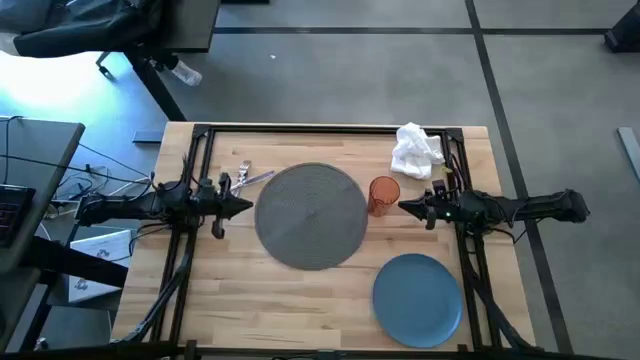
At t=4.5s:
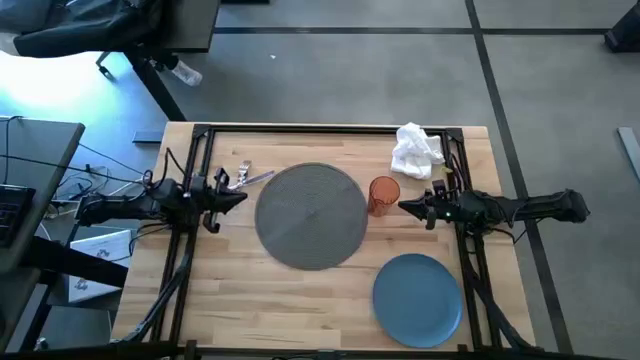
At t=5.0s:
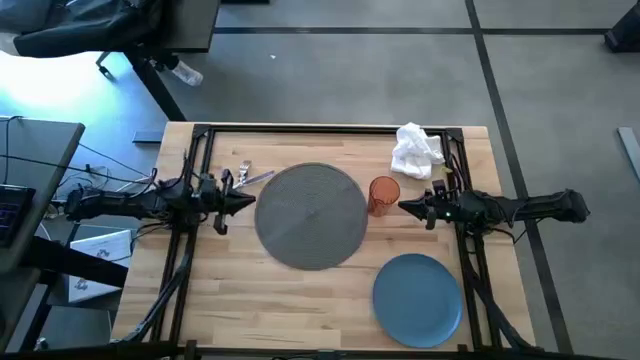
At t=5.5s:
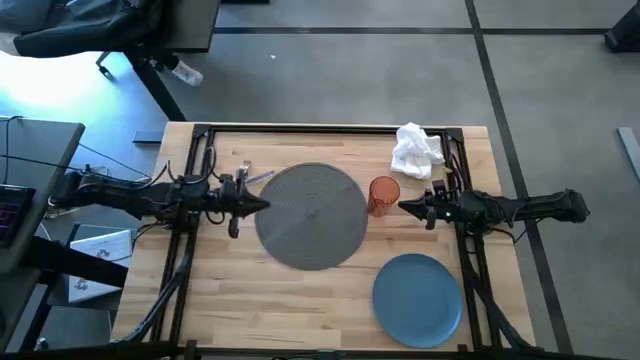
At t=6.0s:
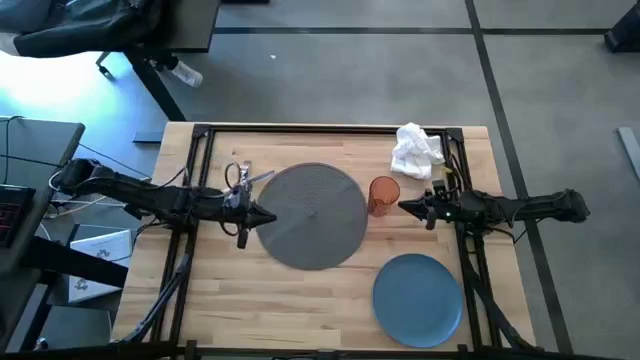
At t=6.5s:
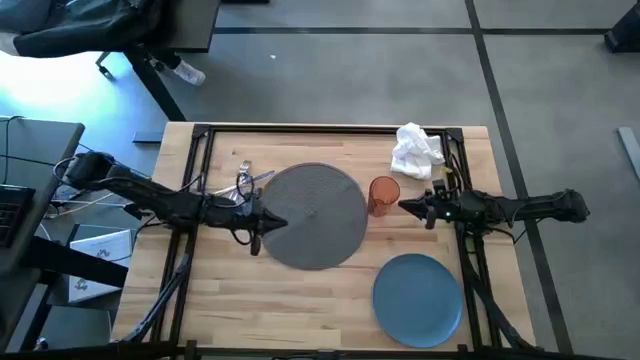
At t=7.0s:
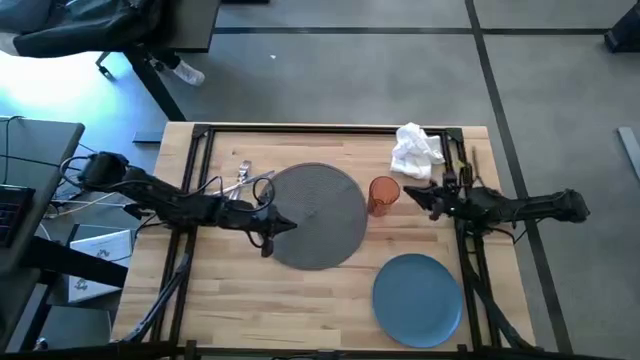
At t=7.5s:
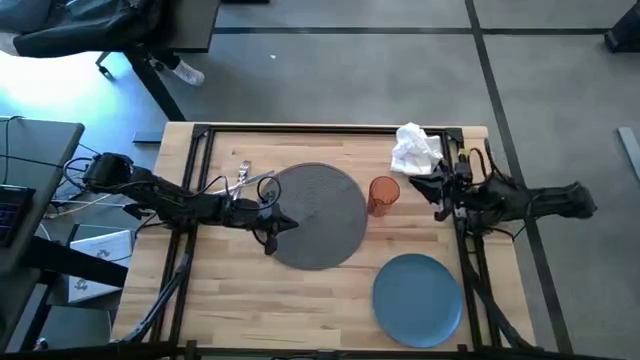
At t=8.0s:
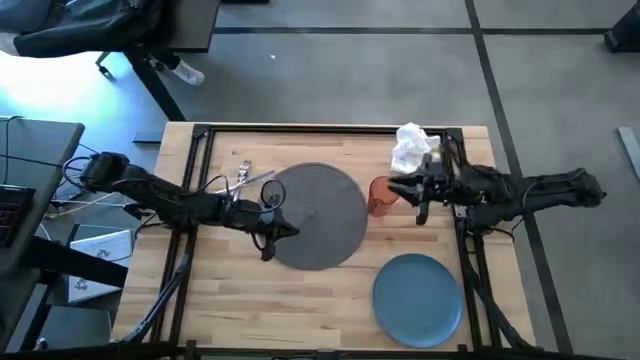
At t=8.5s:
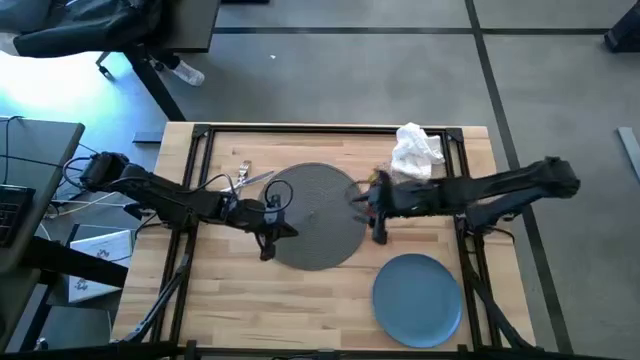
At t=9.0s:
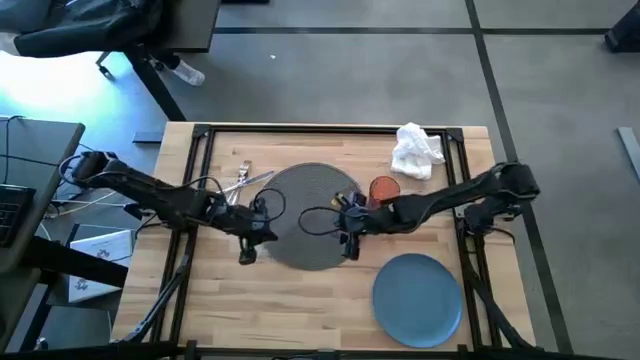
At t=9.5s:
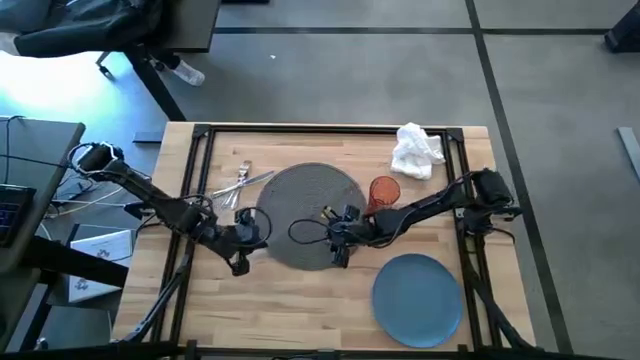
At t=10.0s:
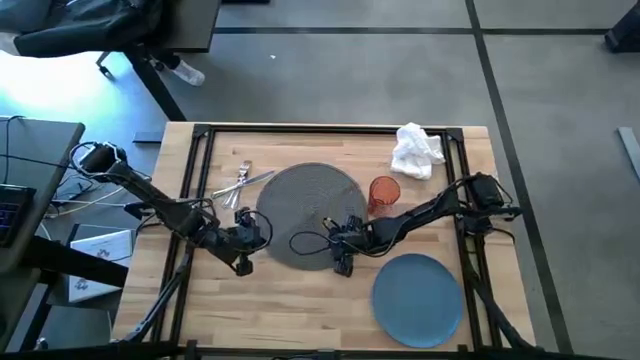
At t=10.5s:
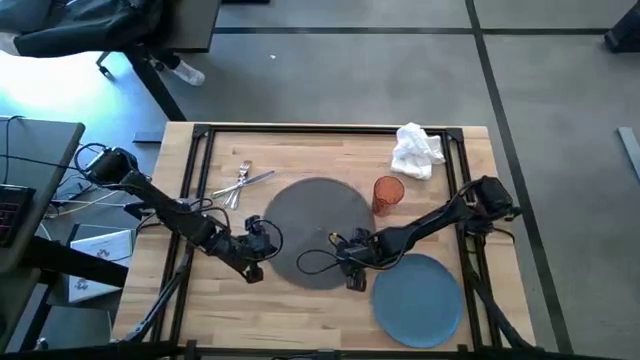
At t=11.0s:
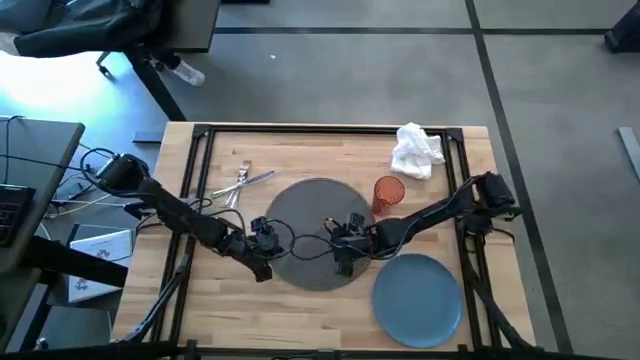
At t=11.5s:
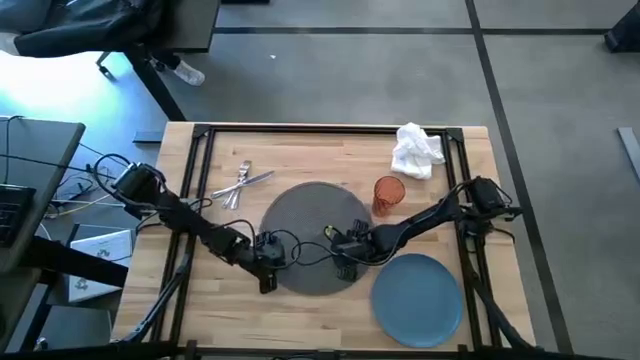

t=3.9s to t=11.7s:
Task: Set table place
Prepare the gray table mat

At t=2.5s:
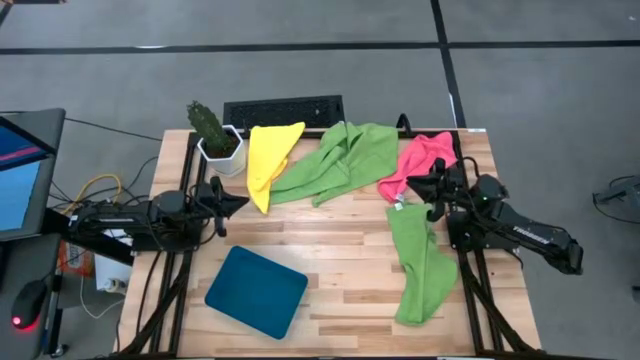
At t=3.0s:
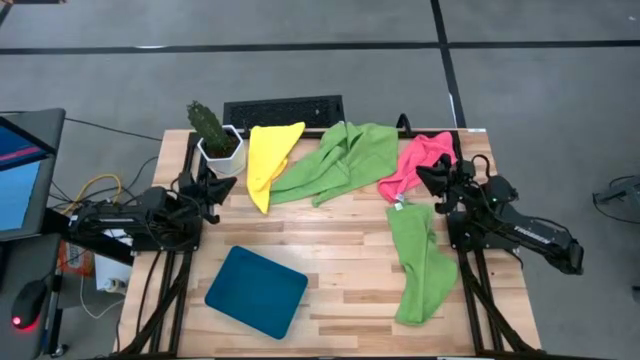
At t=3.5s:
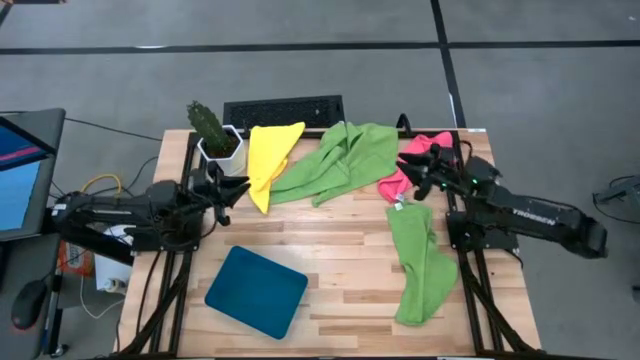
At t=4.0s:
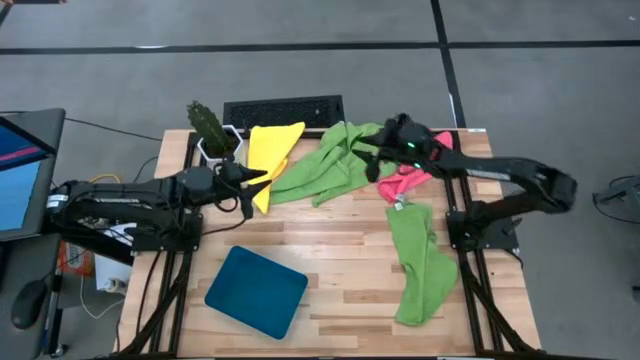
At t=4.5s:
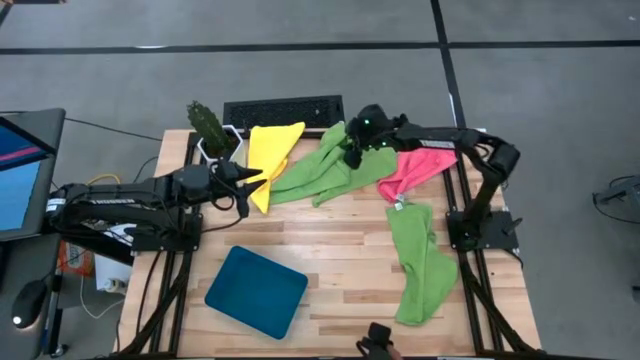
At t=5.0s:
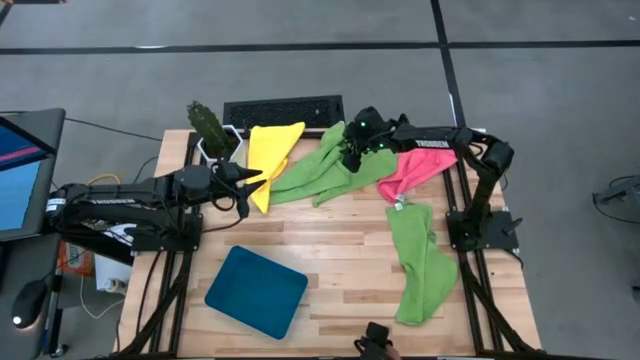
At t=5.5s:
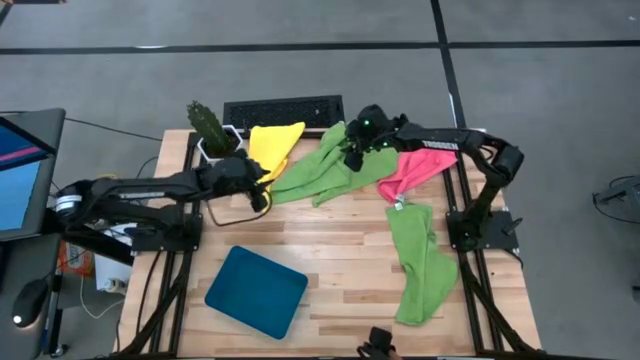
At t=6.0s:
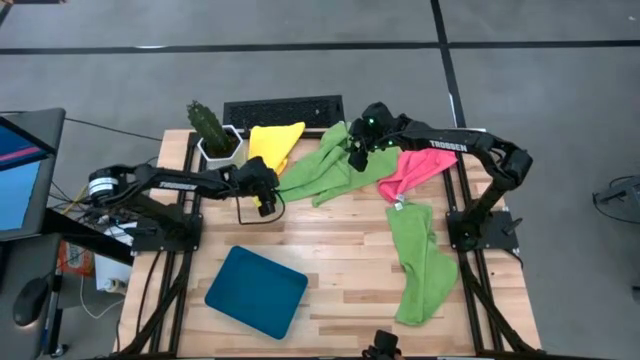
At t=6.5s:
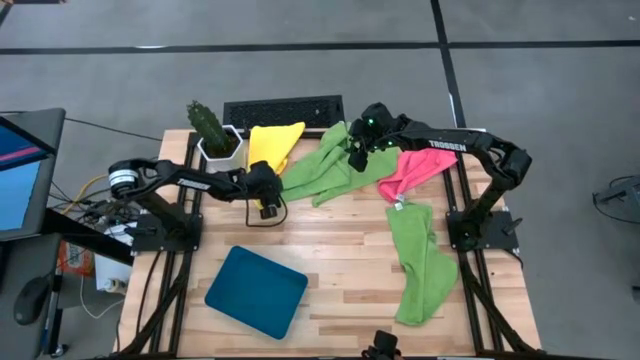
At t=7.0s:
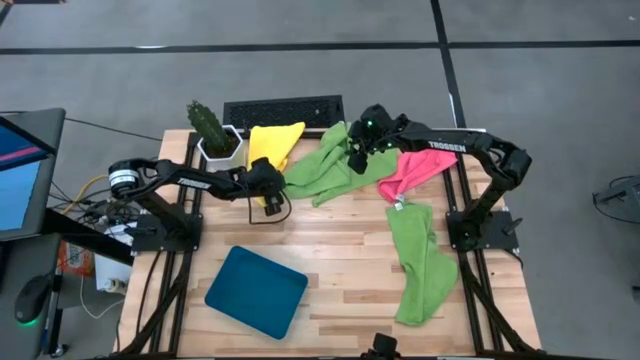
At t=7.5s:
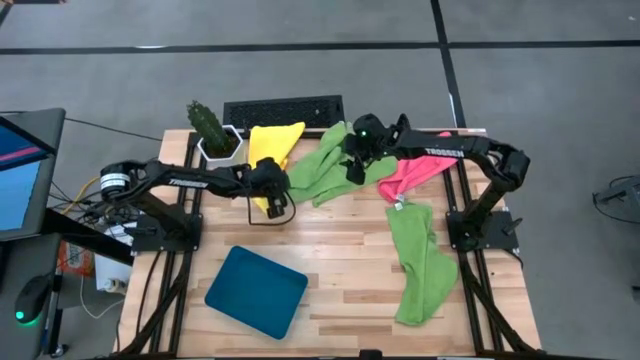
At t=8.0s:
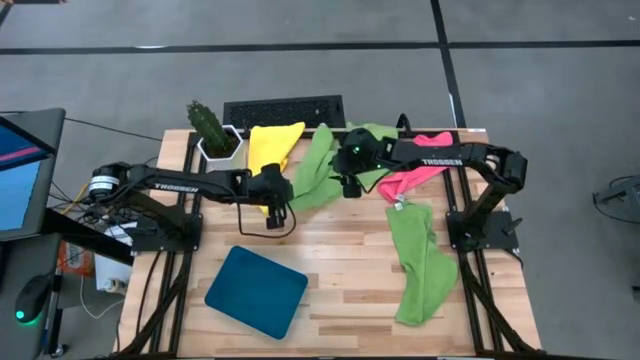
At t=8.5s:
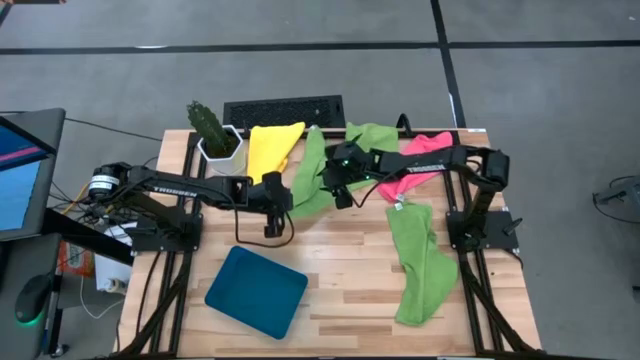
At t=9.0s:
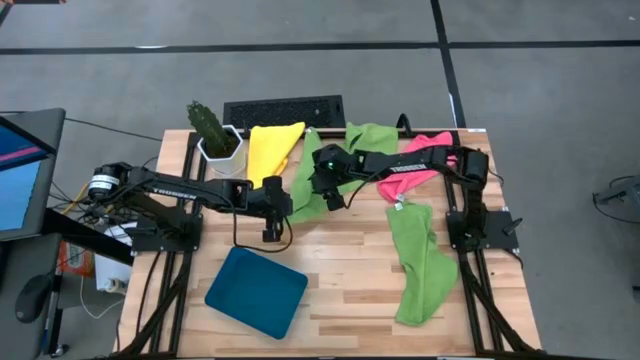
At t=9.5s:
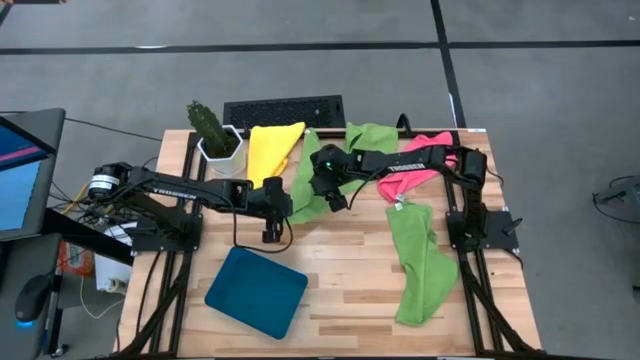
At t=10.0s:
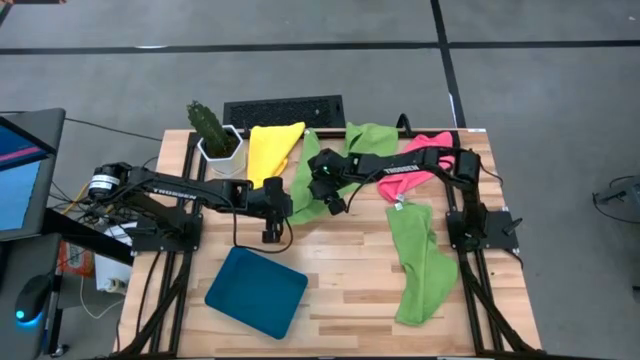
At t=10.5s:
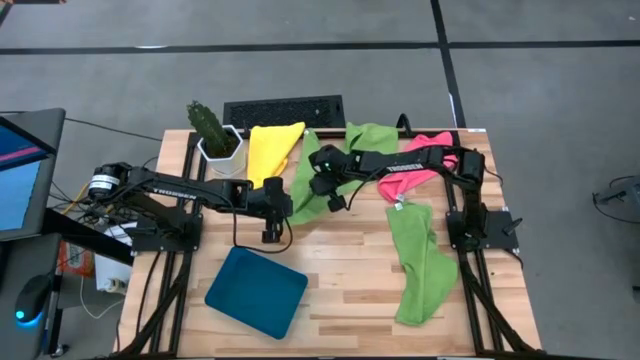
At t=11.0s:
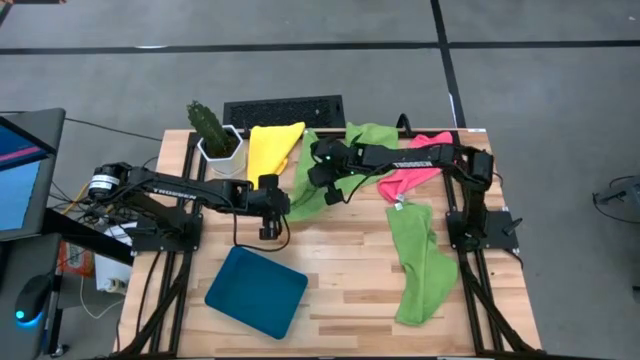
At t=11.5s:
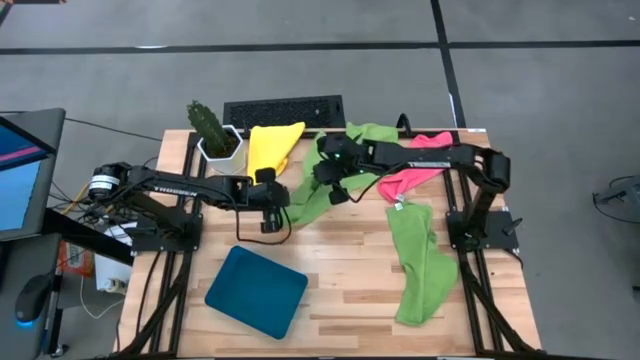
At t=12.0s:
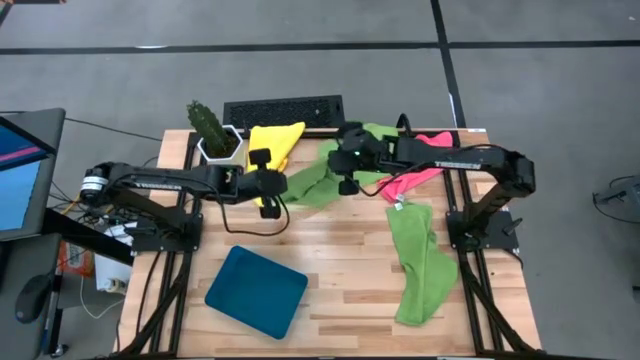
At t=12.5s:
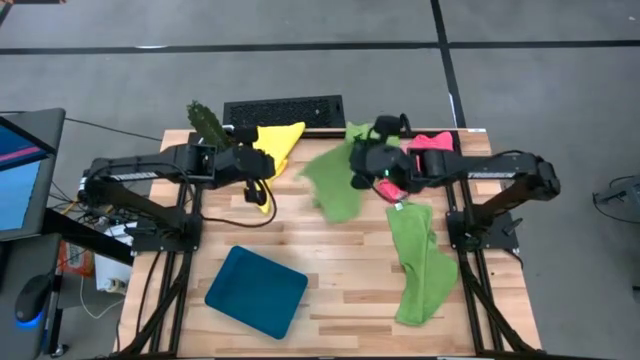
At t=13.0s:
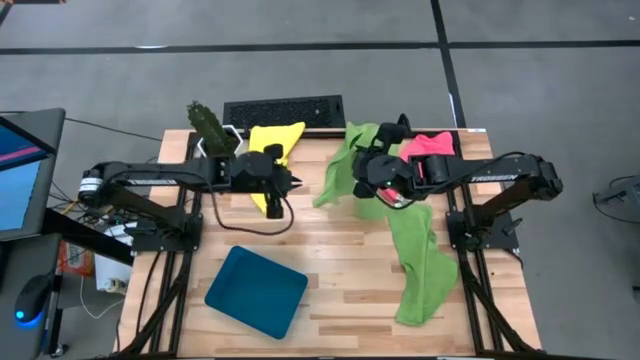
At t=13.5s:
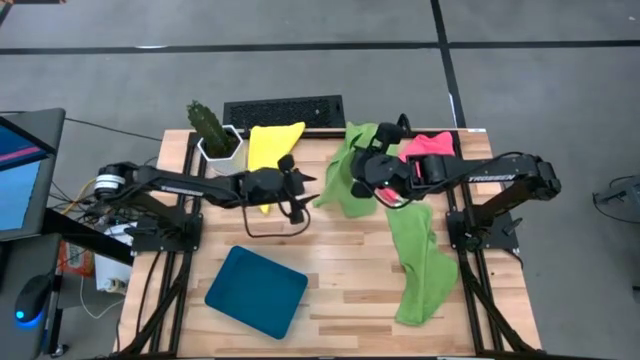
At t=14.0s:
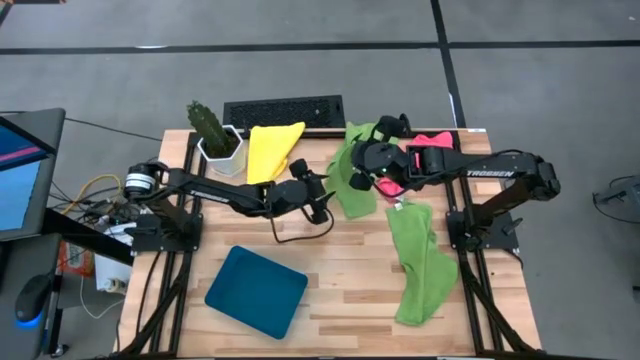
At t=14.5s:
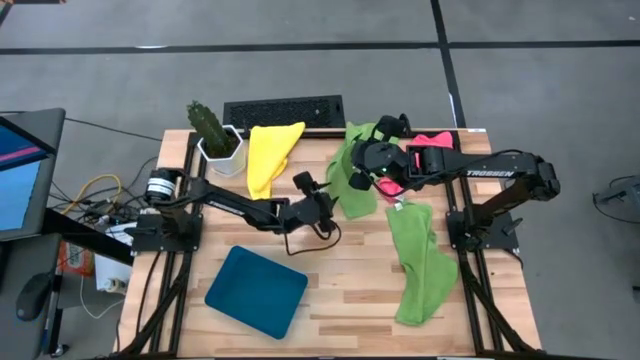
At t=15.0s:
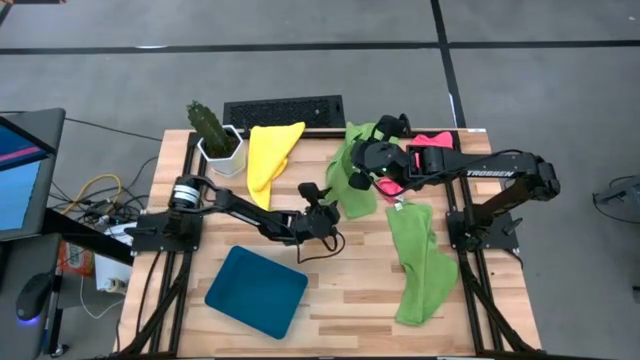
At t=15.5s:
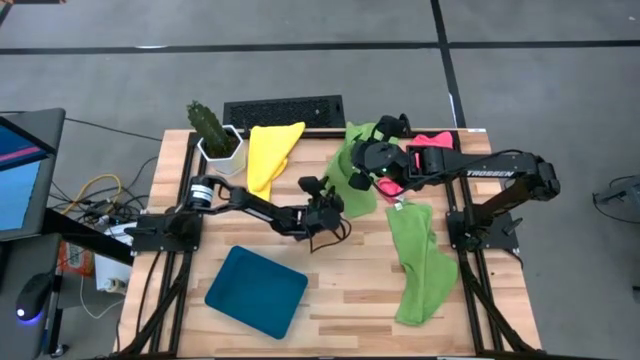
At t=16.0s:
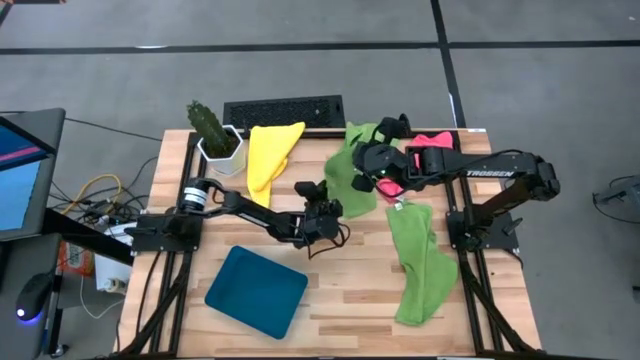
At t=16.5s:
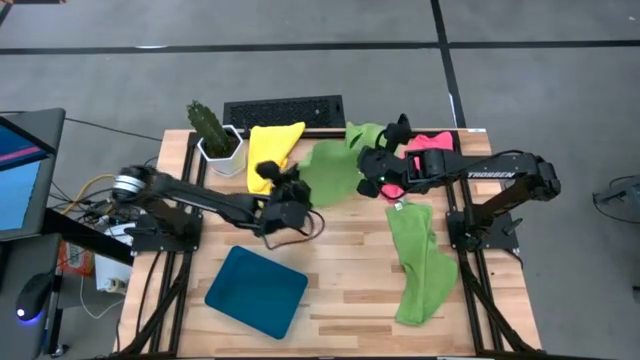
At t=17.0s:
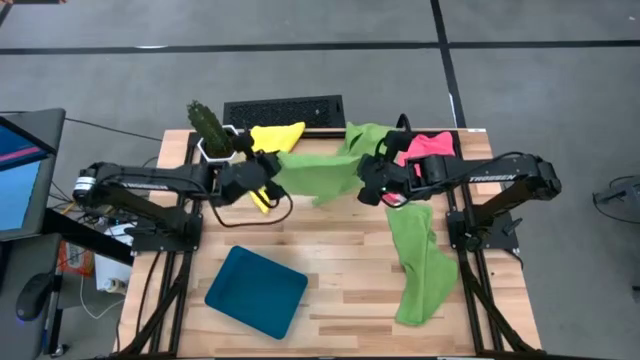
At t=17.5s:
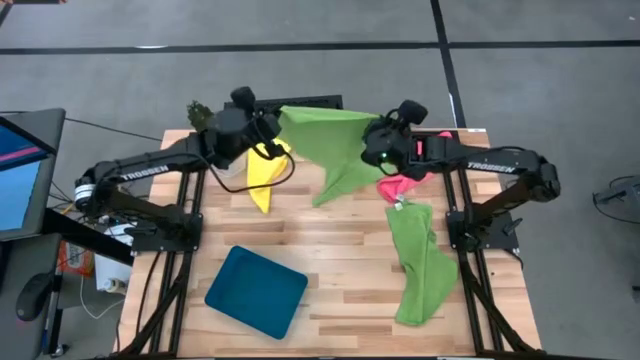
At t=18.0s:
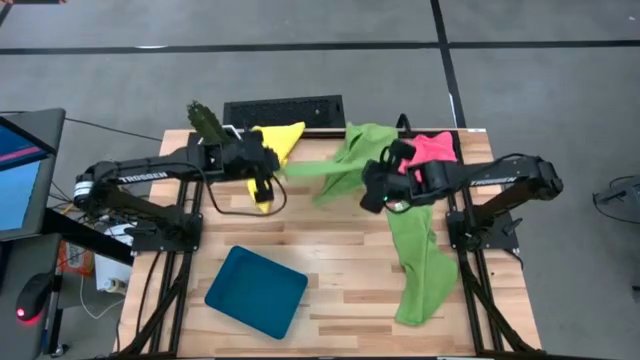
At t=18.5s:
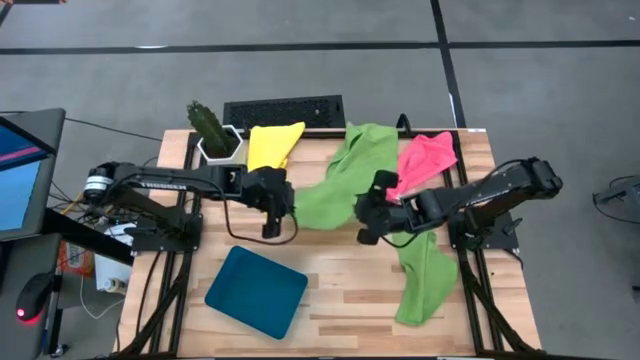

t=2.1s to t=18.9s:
Task: Fold microfiber towels
Fold the top left green microfiber
